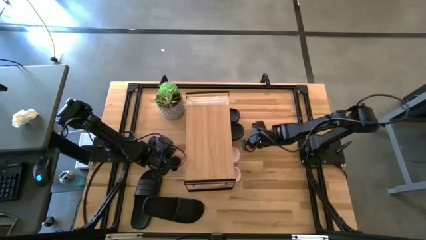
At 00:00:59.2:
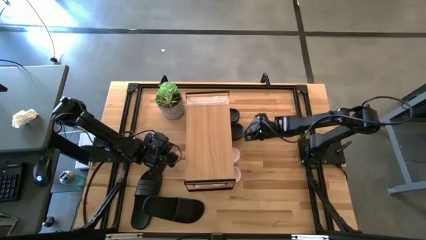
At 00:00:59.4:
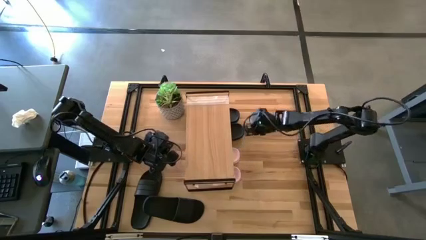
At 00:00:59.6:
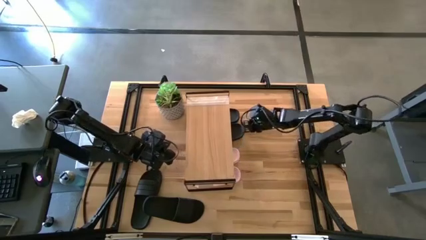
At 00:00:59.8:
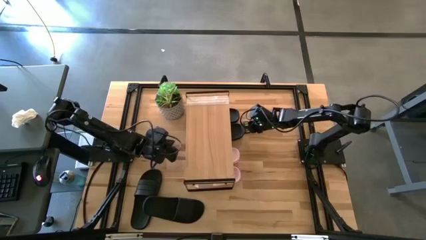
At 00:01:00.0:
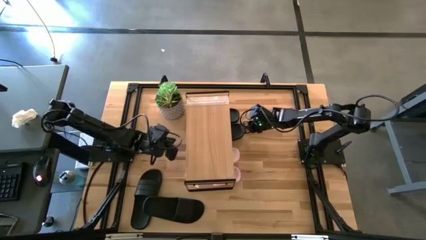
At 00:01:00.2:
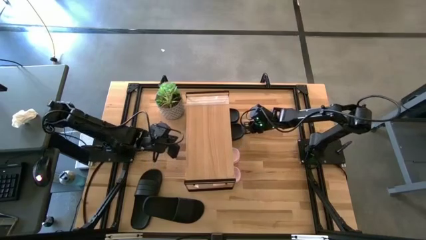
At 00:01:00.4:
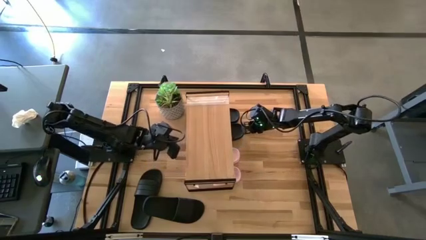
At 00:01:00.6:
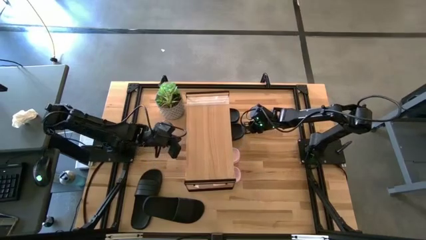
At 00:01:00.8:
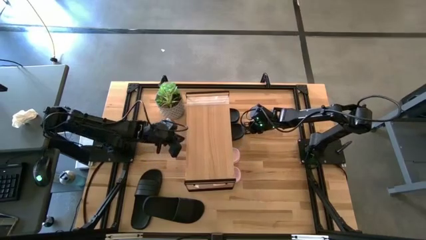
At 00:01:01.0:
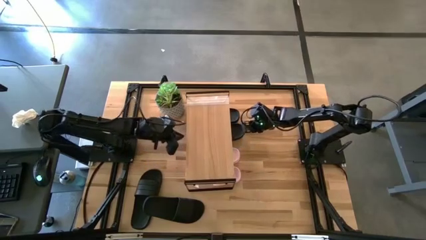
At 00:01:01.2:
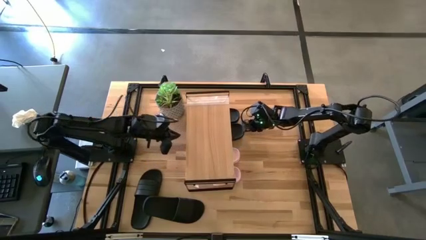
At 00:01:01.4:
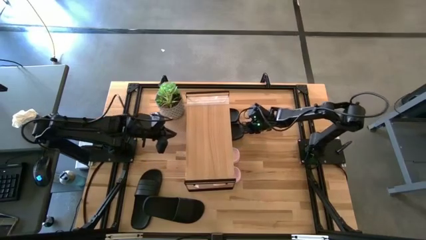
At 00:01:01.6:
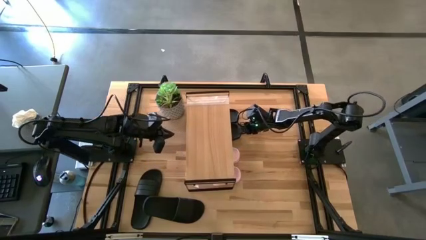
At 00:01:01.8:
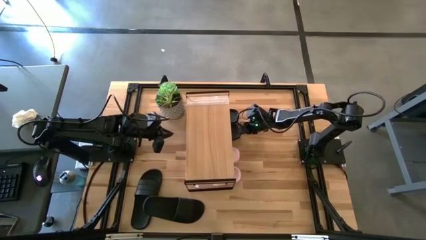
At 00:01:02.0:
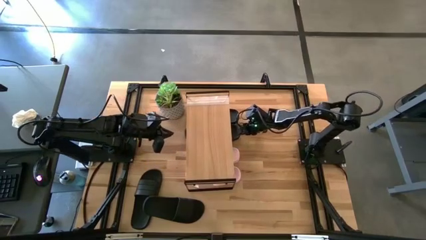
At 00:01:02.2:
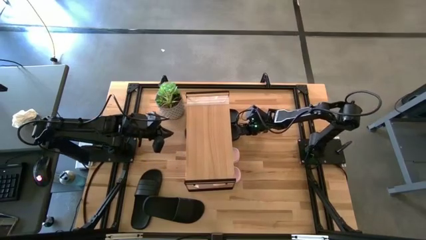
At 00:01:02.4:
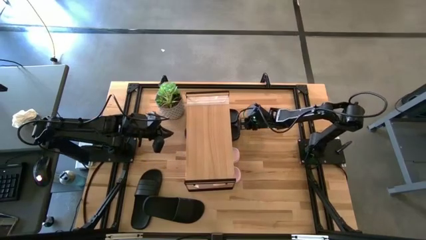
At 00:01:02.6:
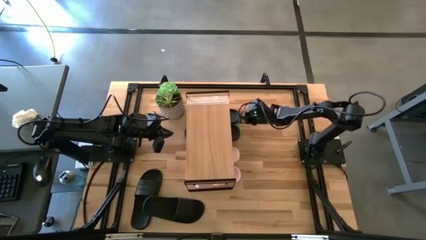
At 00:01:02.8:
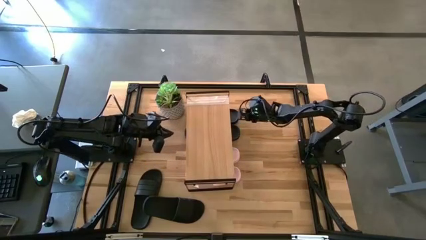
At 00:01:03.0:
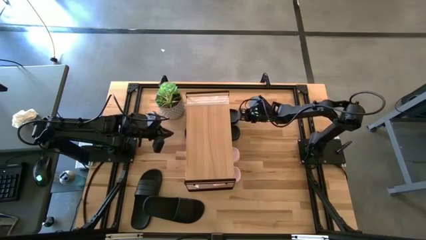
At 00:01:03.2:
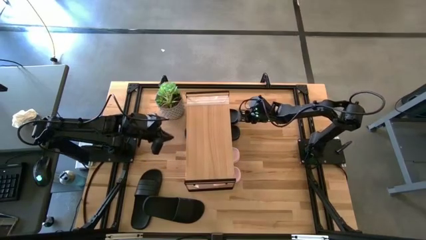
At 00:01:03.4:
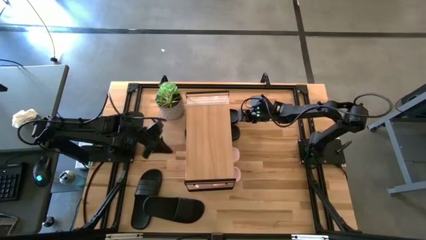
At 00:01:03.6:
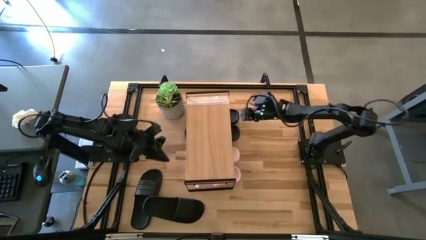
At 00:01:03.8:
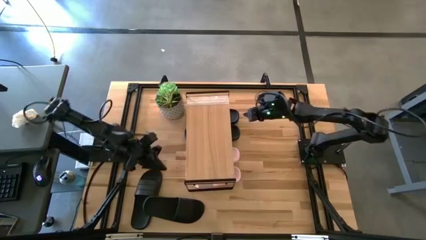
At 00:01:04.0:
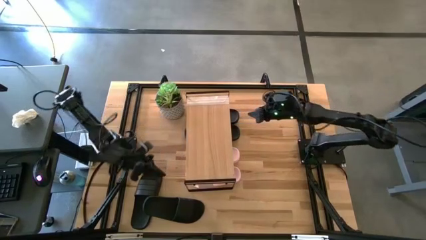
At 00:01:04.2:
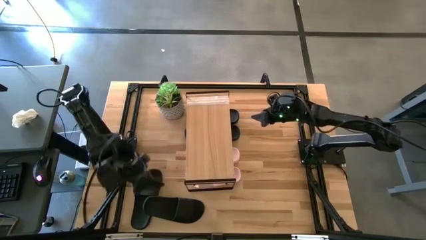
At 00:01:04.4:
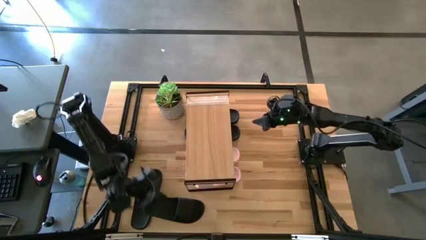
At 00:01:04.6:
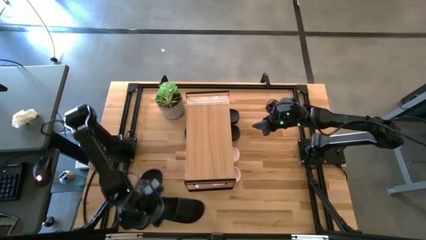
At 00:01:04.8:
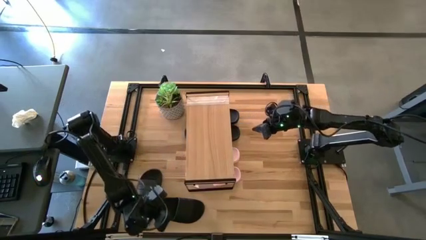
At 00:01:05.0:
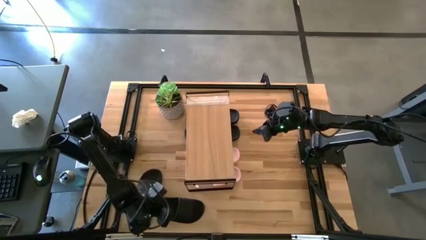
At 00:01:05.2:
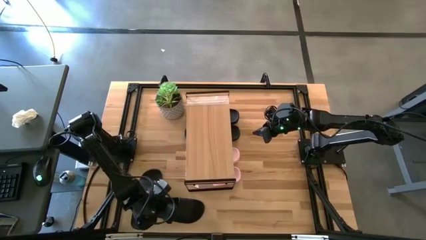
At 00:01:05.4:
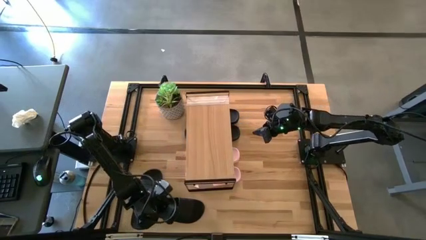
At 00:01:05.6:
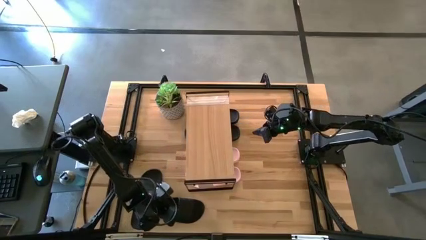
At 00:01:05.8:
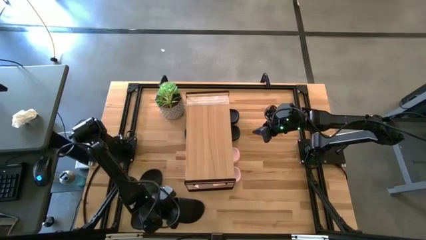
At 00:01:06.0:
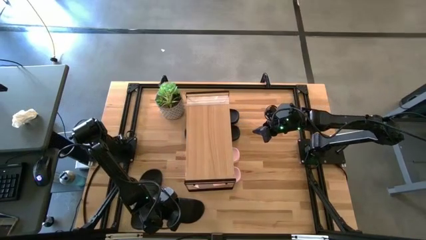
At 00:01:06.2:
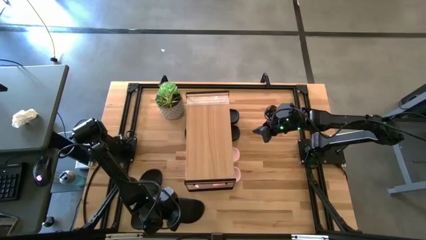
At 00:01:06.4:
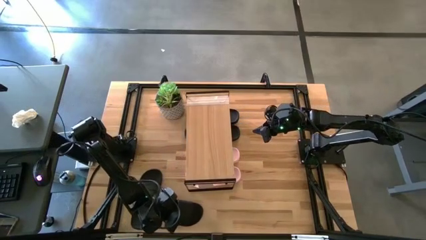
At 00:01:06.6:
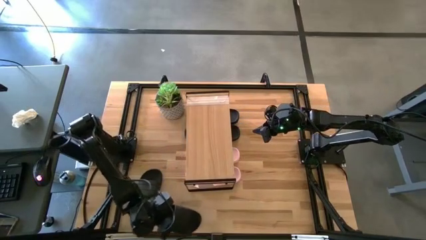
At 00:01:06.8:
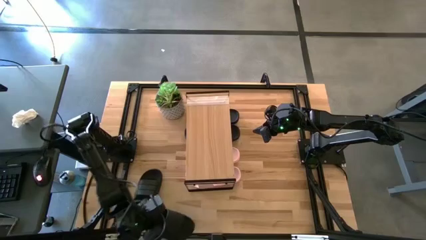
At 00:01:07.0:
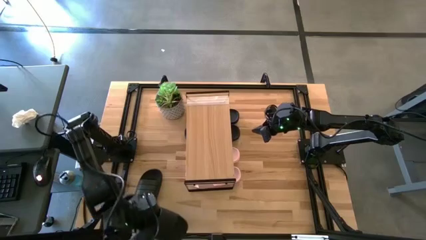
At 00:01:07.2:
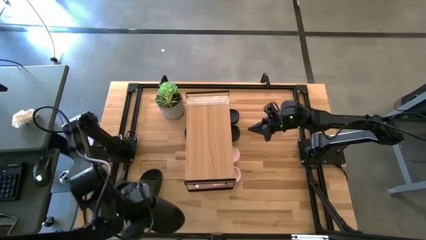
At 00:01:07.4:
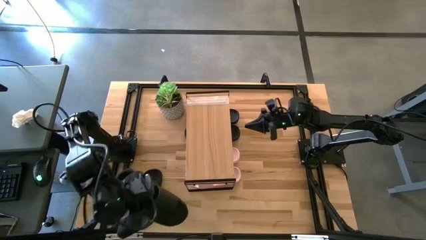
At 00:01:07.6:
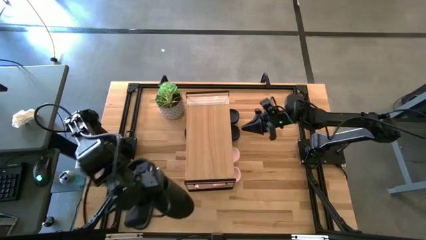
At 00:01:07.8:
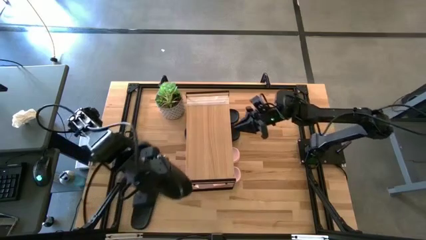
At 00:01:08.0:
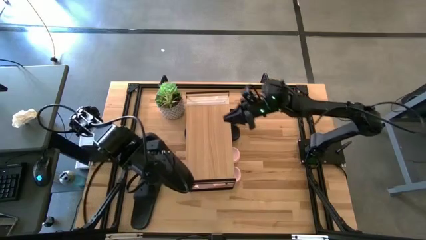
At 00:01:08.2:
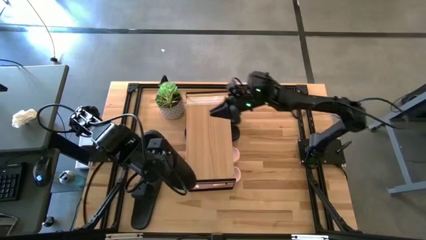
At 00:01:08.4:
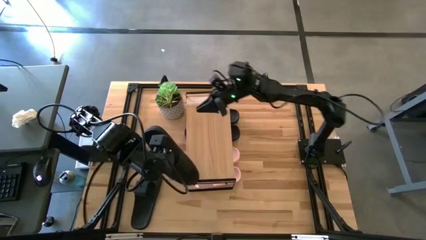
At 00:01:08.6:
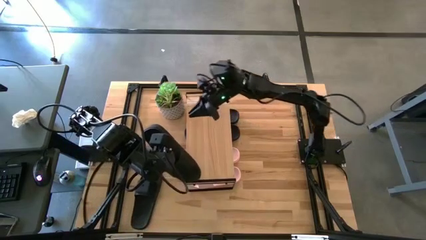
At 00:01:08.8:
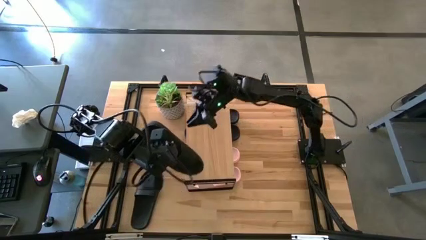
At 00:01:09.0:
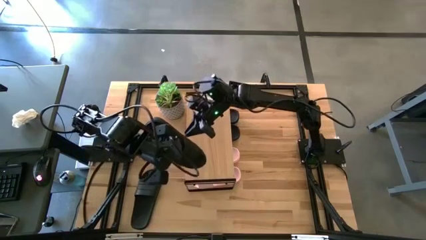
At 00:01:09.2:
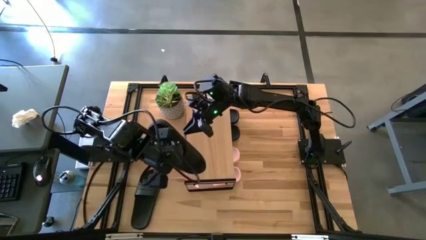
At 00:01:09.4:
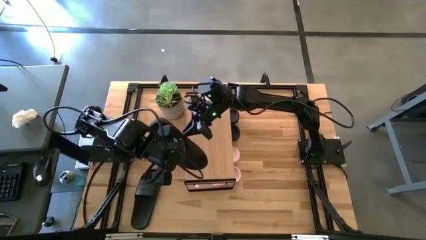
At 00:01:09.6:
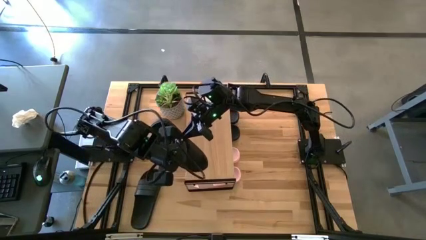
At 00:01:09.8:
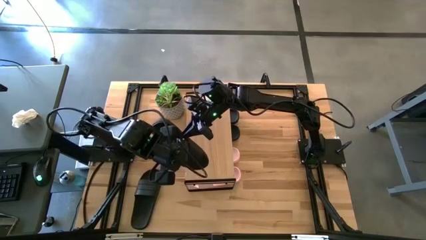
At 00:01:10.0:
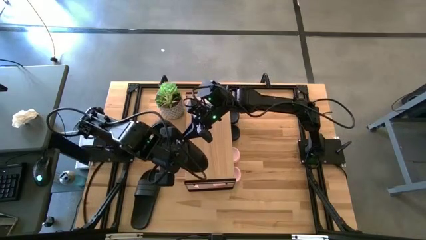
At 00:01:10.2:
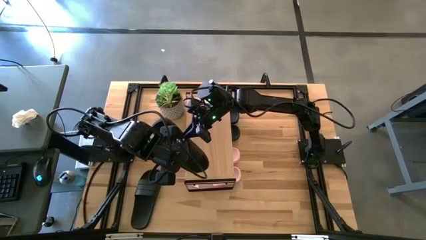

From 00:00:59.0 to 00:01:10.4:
Task: Pick and place slides into the shelf
Put the right black slide on the shelf
